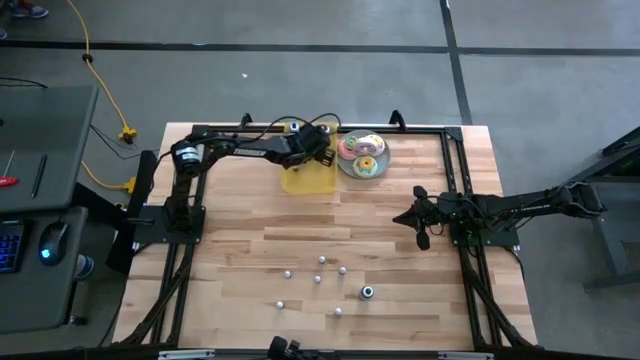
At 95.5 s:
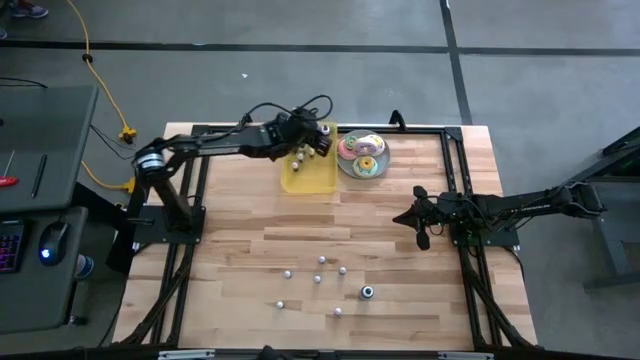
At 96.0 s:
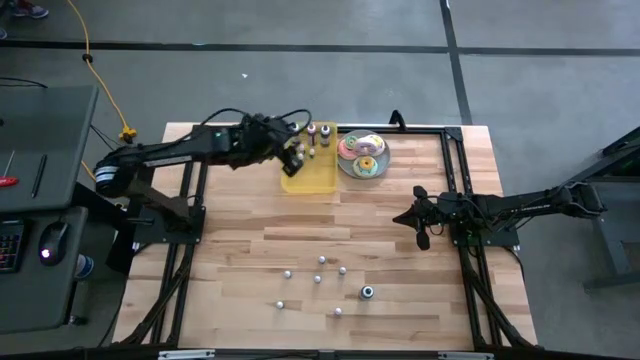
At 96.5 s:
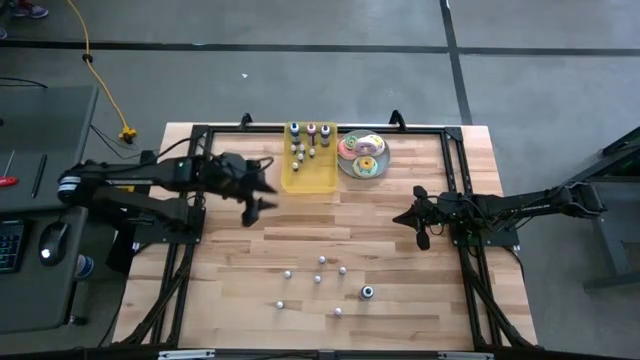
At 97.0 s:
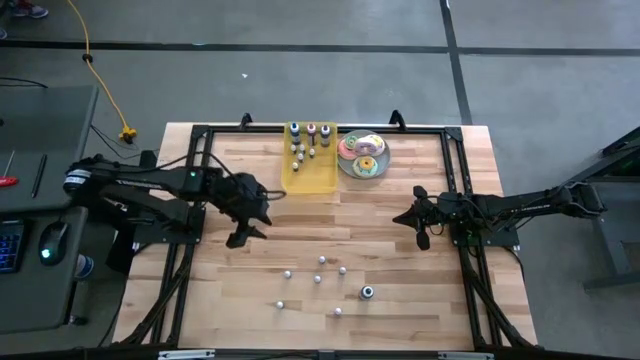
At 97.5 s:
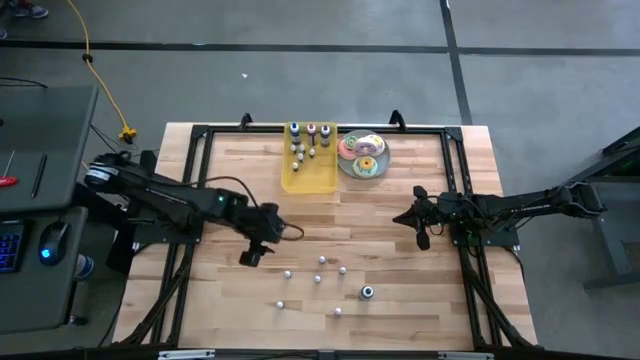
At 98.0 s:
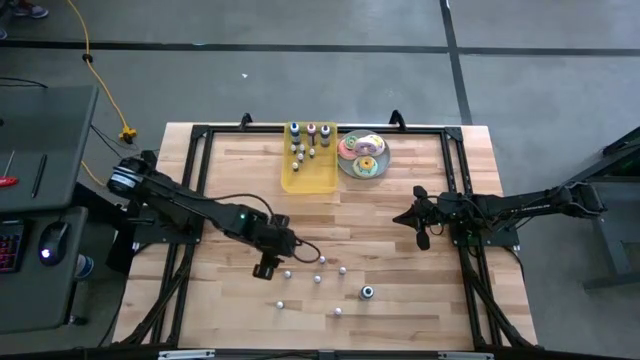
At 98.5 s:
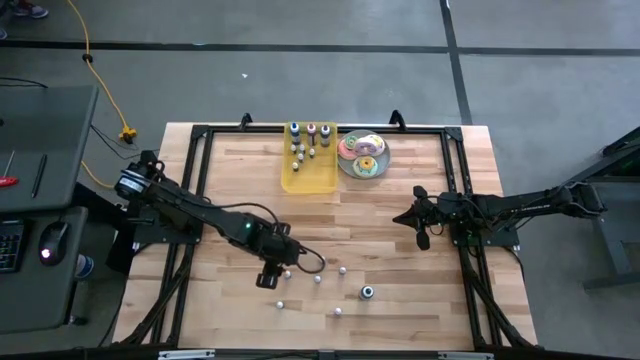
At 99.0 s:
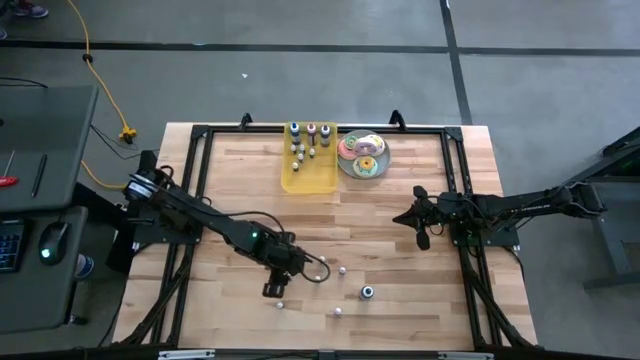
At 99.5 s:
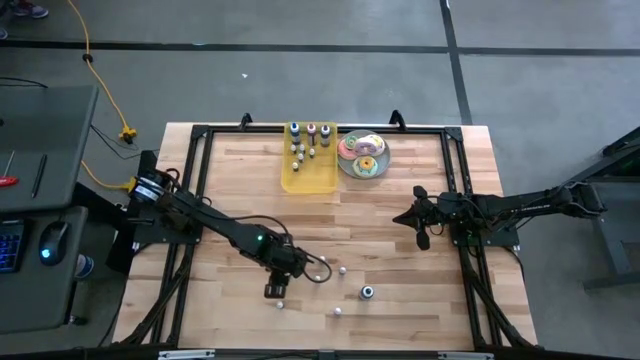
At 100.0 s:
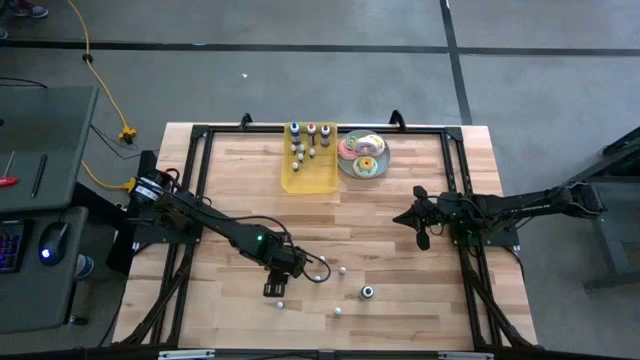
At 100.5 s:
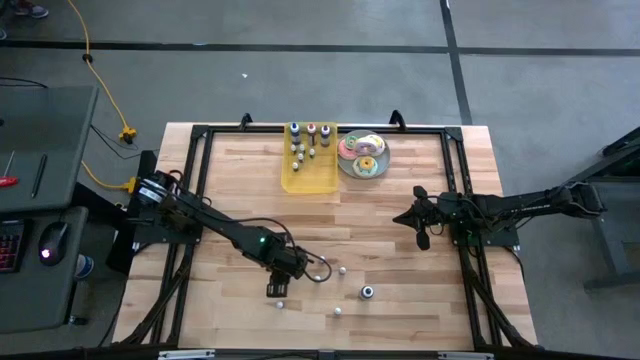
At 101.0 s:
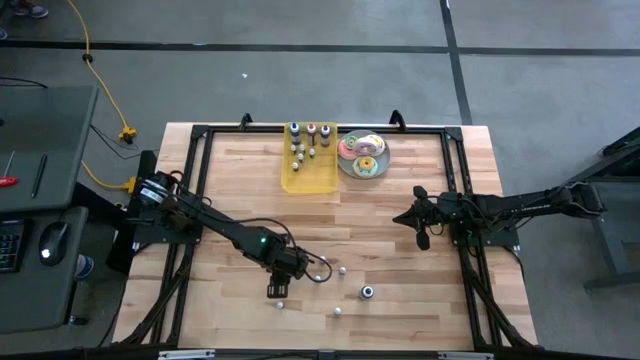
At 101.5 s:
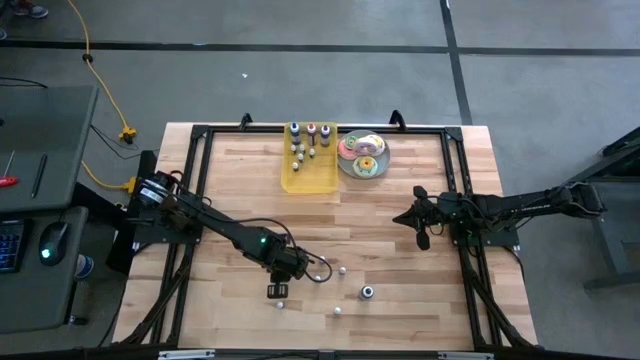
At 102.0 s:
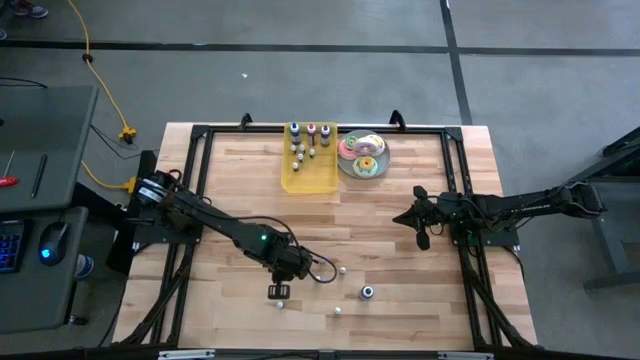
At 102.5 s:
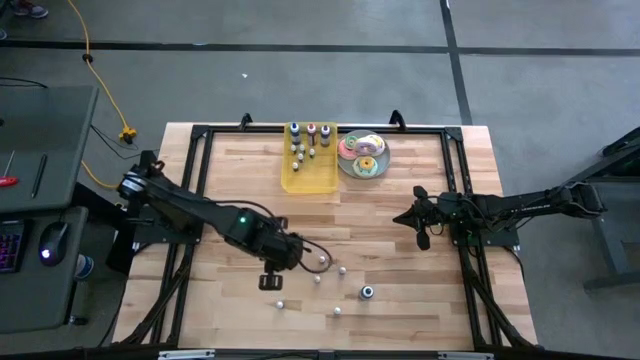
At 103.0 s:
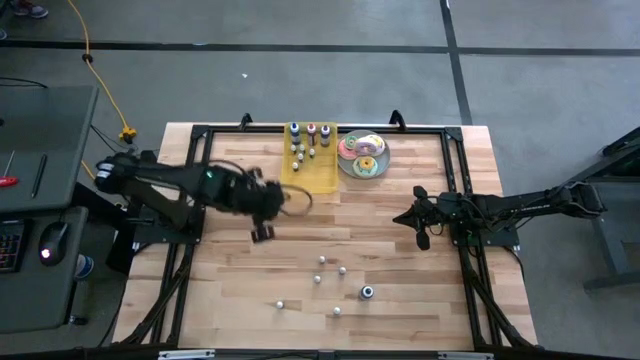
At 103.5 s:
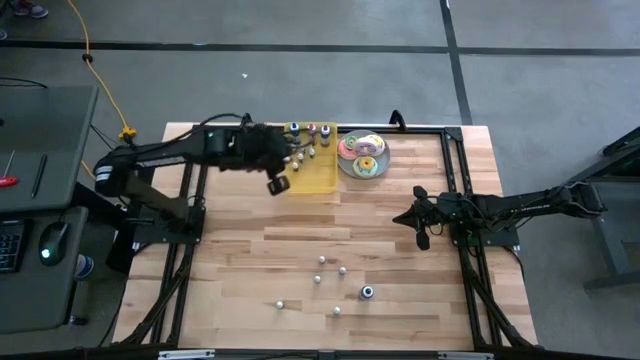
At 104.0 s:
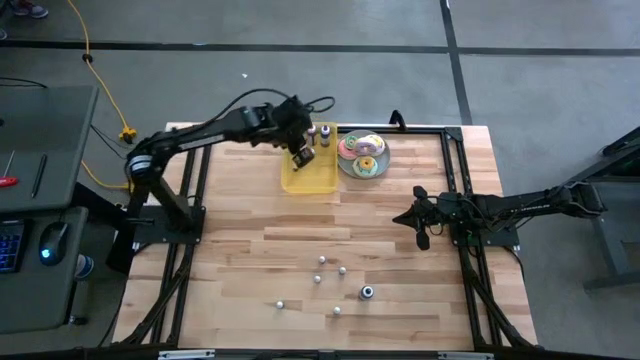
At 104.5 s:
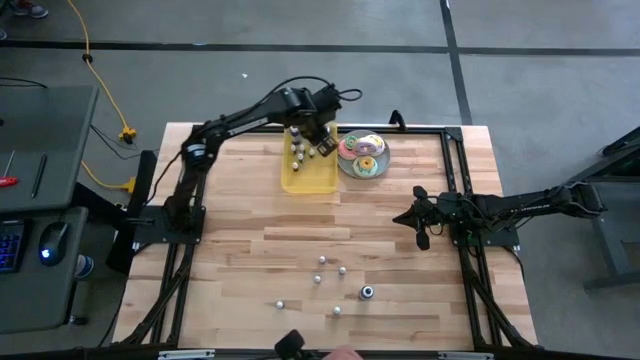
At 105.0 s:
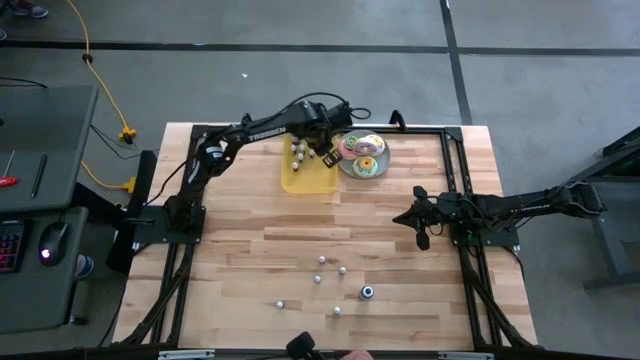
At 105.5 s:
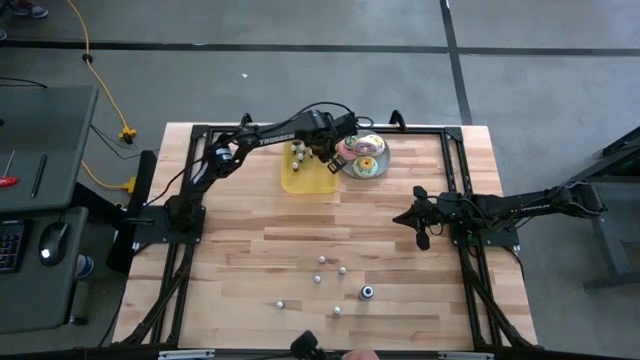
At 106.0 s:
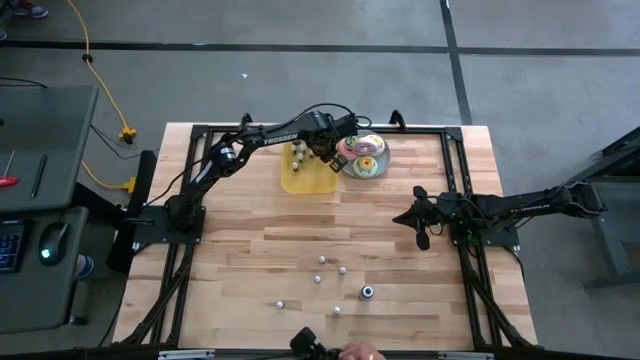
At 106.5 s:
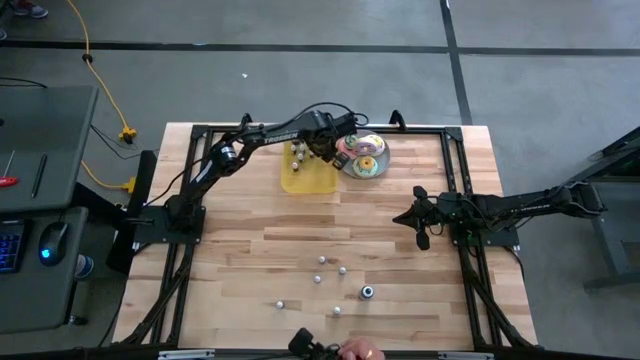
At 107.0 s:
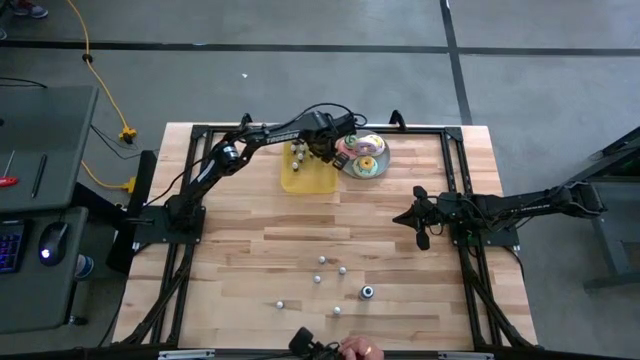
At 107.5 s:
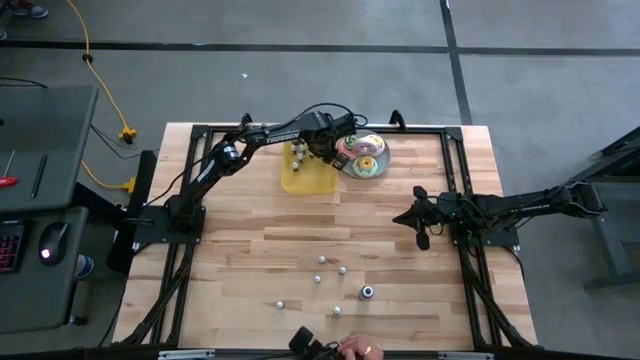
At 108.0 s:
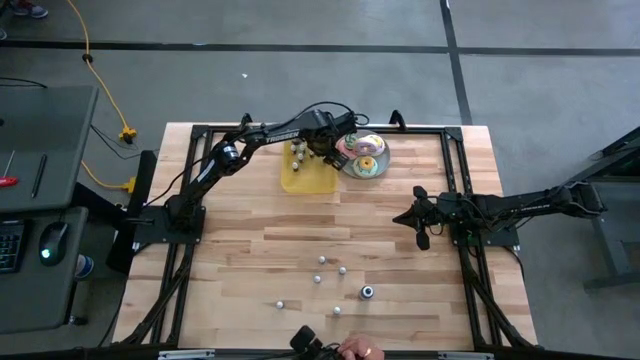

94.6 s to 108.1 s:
Task: Pick & Place food coloring
Put the small black food coloring bottle into the bin

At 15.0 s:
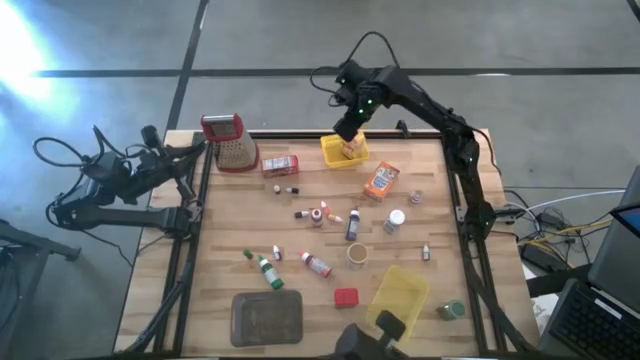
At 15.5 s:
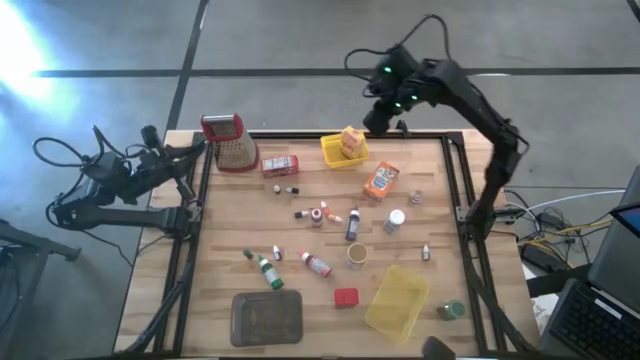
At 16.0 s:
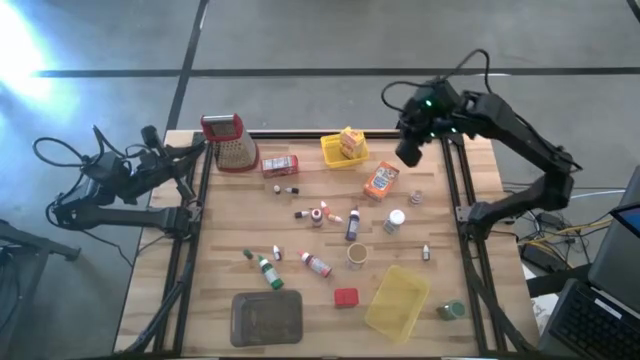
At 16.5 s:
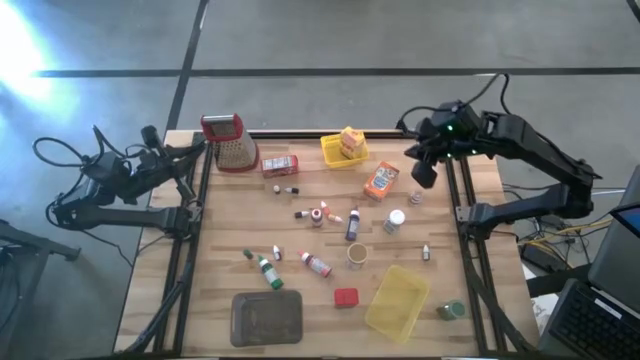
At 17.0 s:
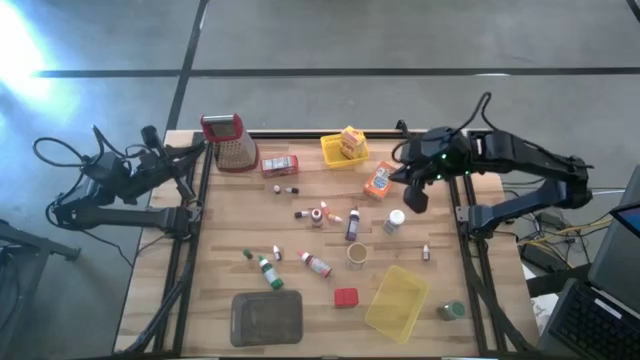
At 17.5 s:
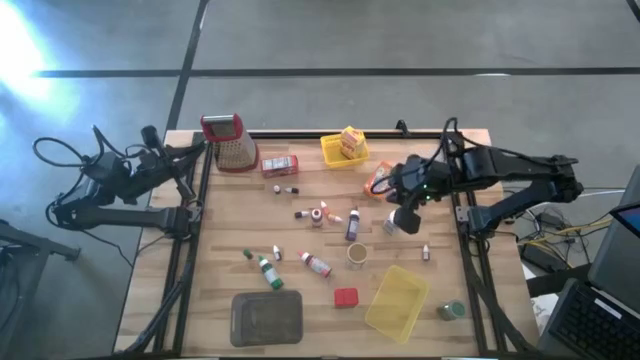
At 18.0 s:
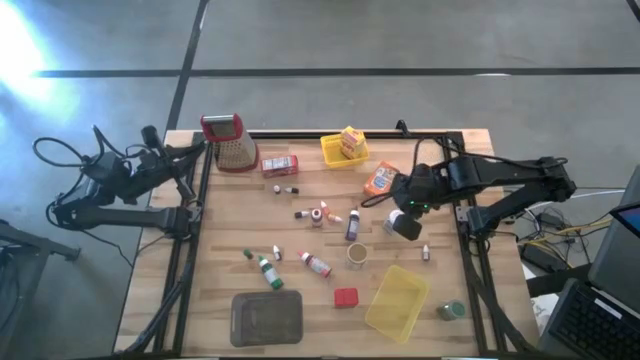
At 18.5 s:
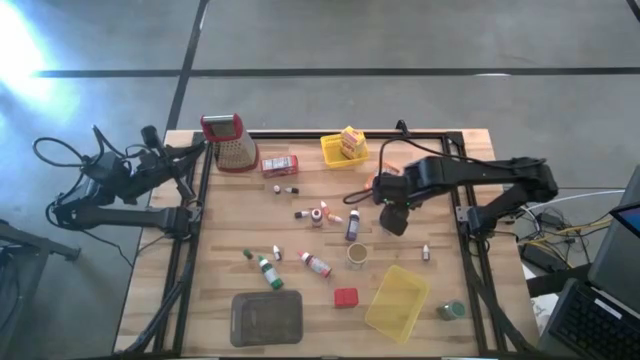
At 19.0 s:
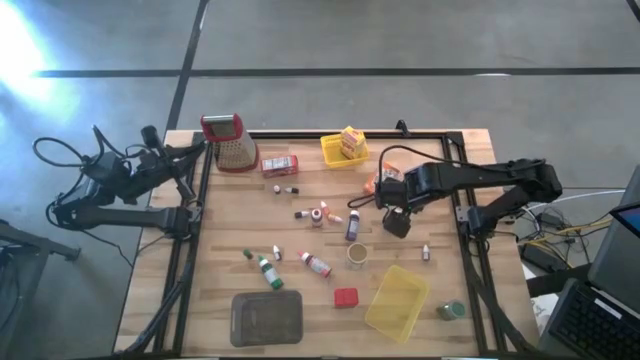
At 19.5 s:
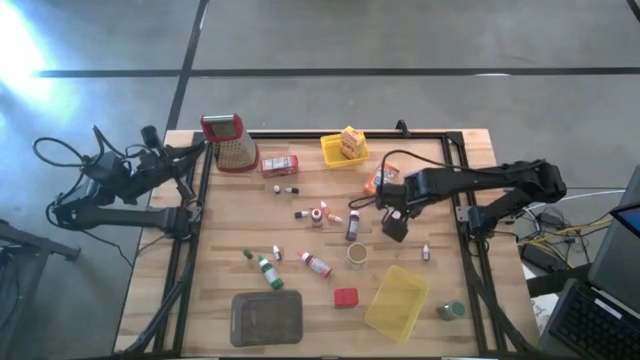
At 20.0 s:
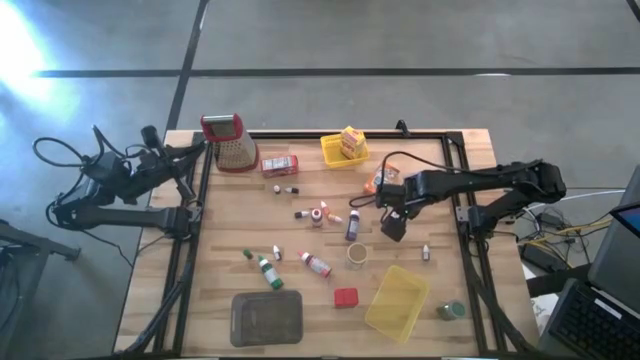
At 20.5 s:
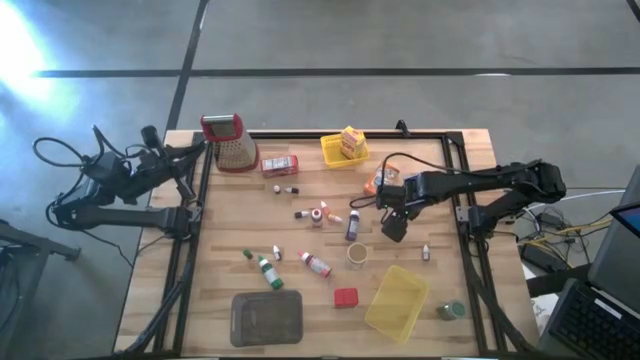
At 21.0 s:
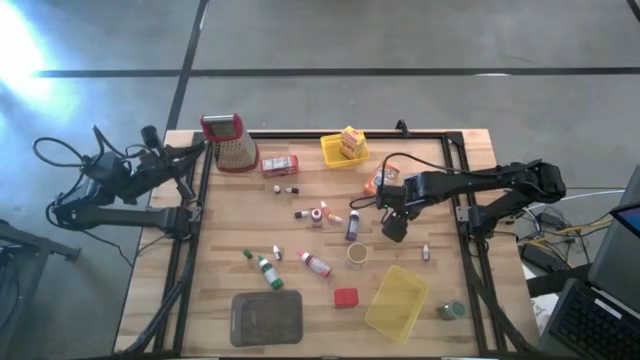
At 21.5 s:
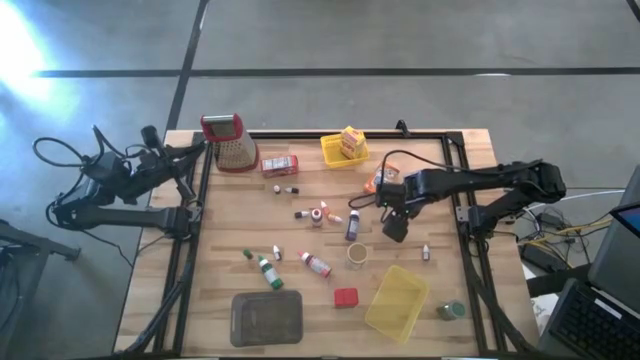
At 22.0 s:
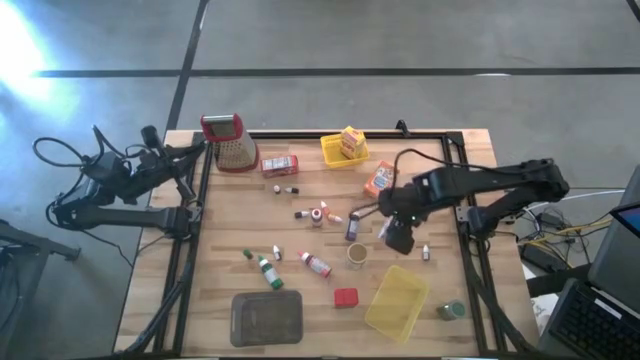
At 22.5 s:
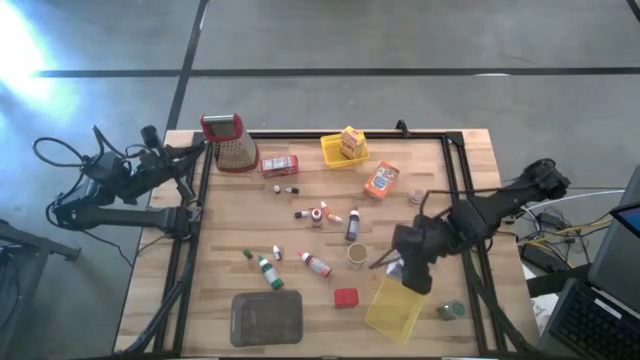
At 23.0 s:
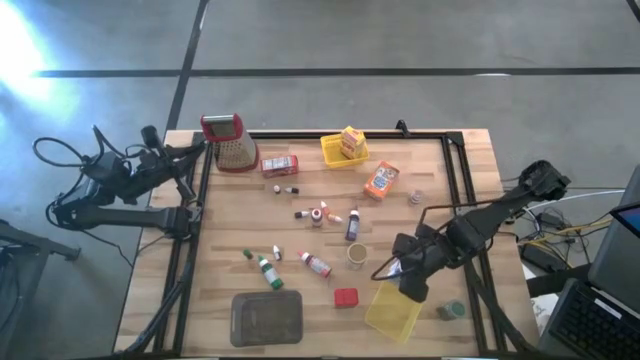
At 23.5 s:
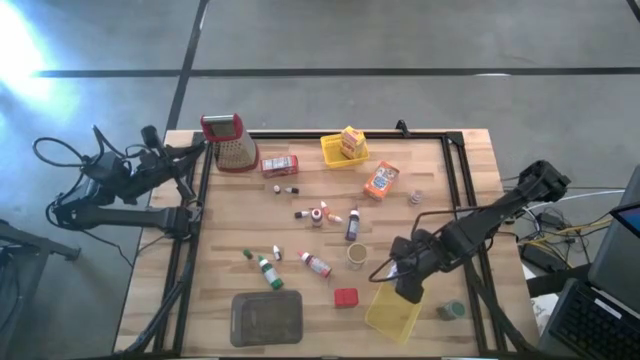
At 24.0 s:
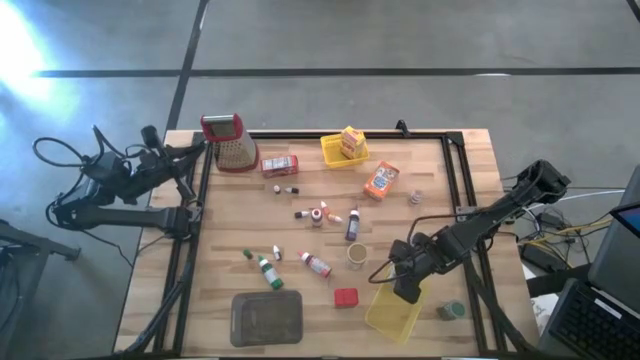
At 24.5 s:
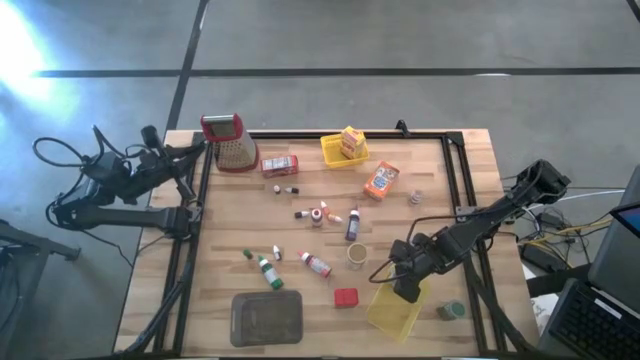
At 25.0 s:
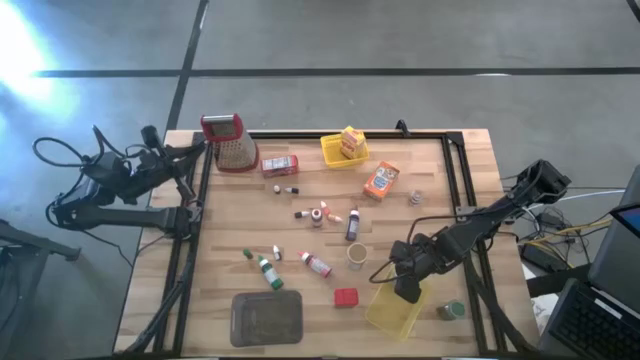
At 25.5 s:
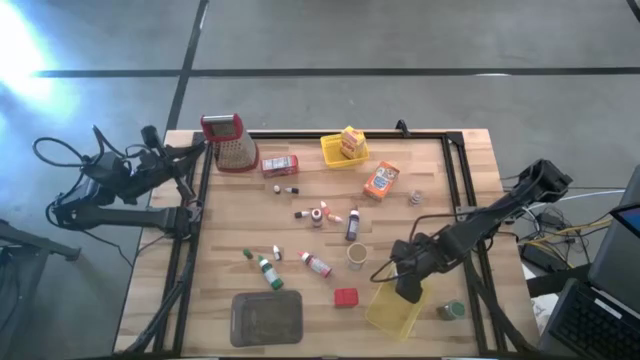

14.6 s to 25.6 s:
Task: Pick & Place Kitchen Items
Put the white seasoning bottle into the bottom yellow bin
